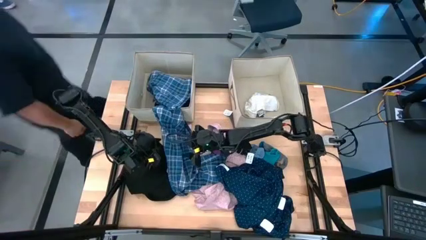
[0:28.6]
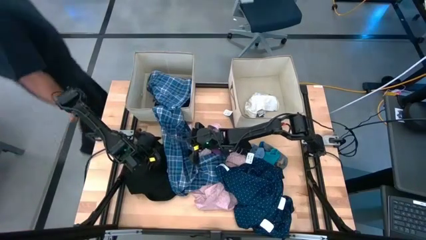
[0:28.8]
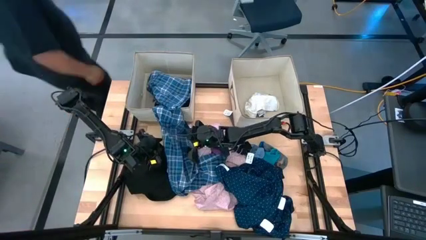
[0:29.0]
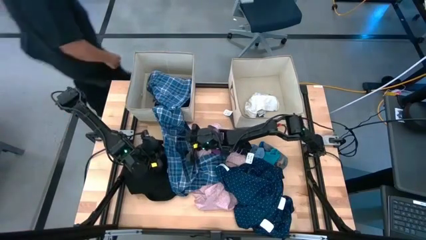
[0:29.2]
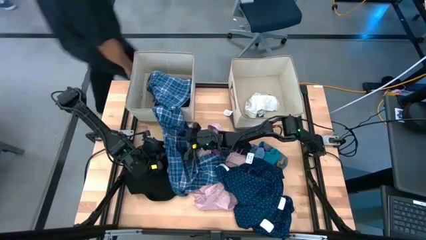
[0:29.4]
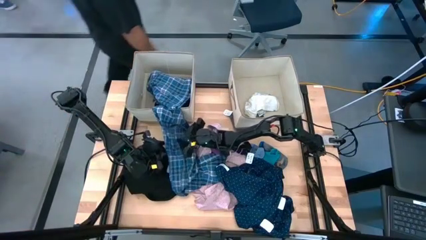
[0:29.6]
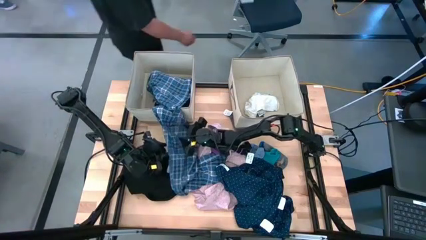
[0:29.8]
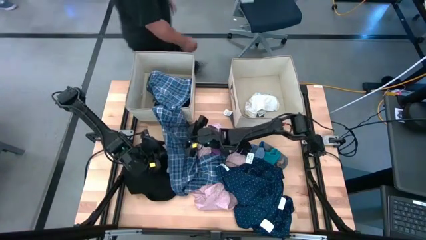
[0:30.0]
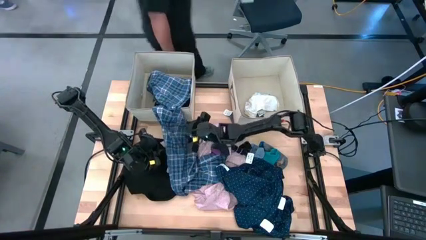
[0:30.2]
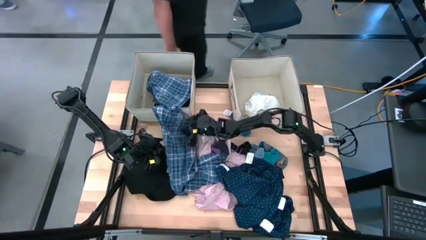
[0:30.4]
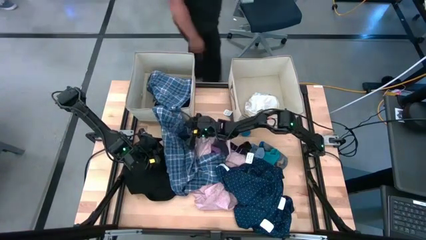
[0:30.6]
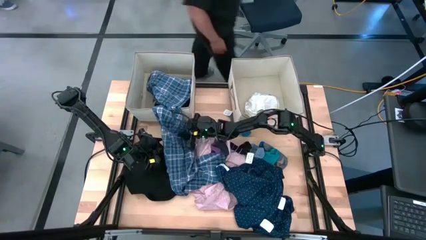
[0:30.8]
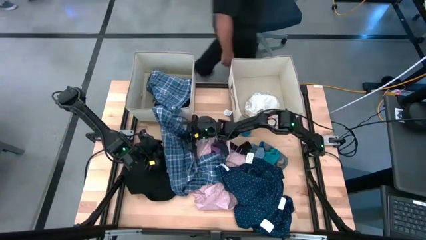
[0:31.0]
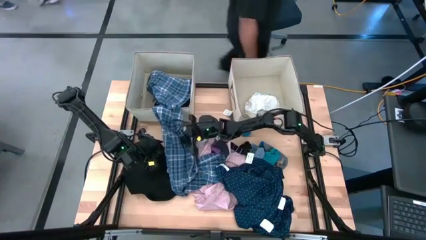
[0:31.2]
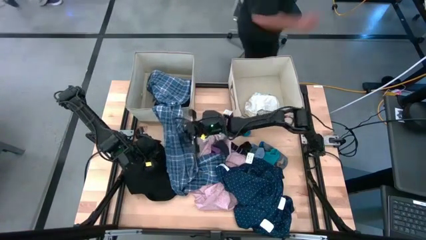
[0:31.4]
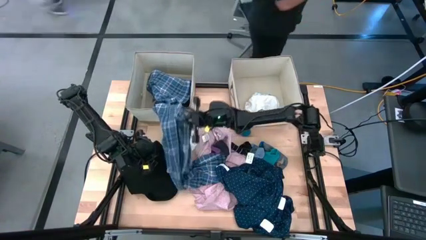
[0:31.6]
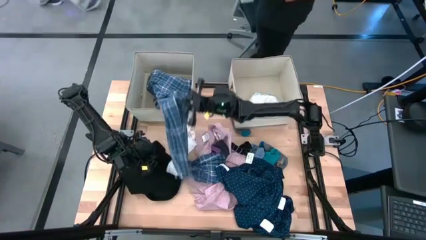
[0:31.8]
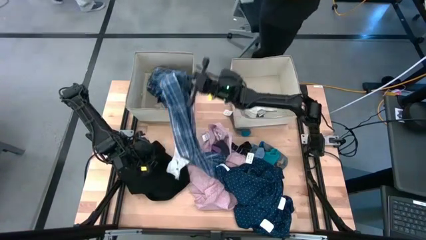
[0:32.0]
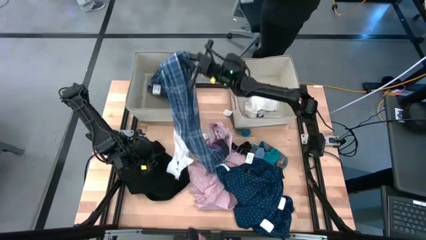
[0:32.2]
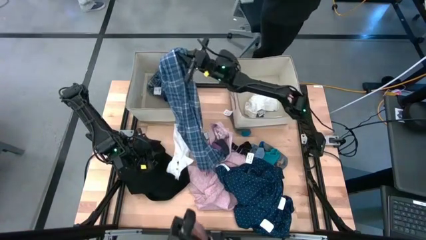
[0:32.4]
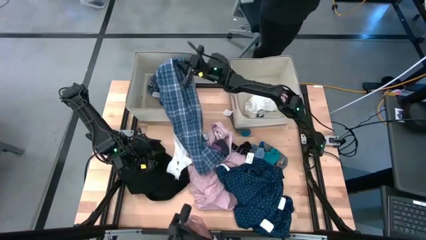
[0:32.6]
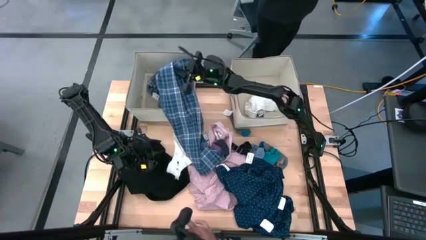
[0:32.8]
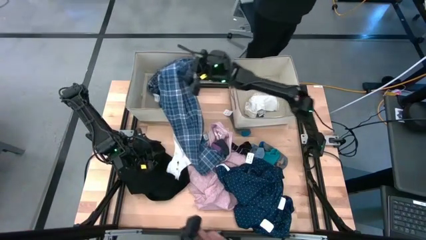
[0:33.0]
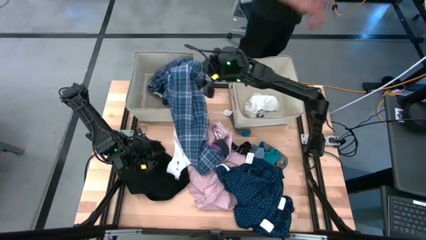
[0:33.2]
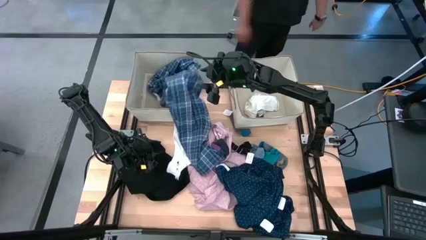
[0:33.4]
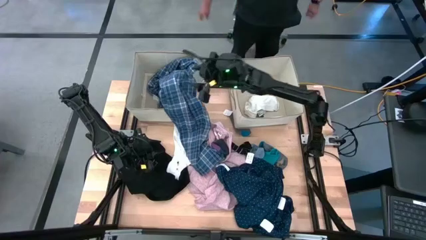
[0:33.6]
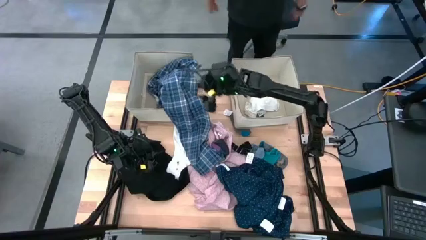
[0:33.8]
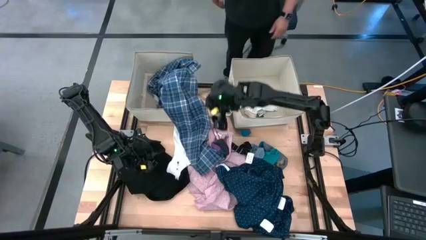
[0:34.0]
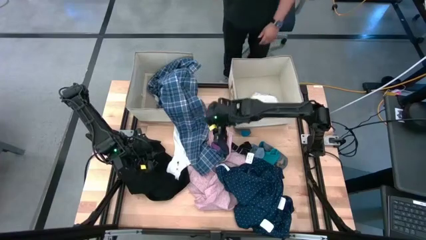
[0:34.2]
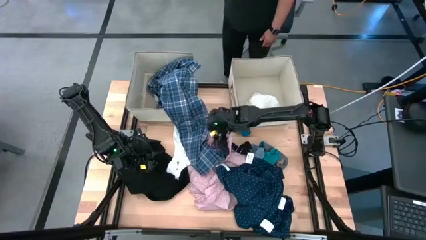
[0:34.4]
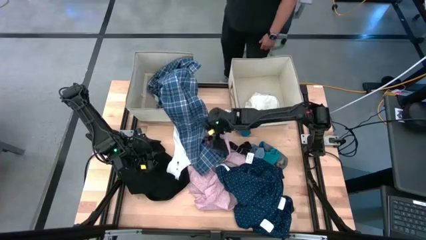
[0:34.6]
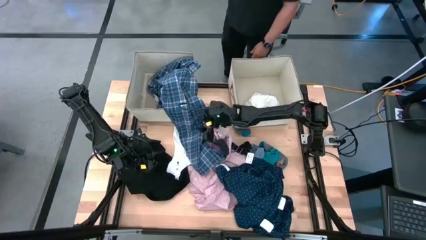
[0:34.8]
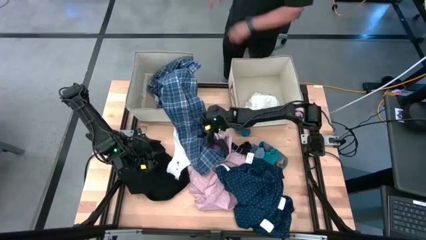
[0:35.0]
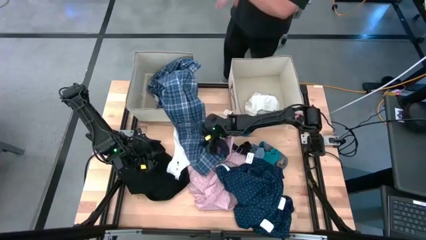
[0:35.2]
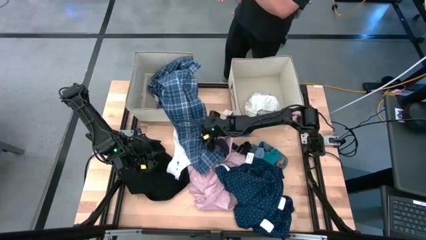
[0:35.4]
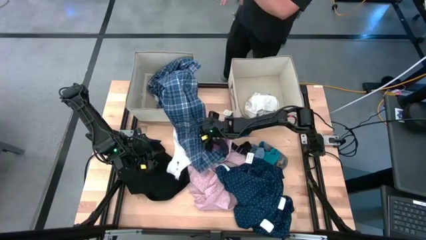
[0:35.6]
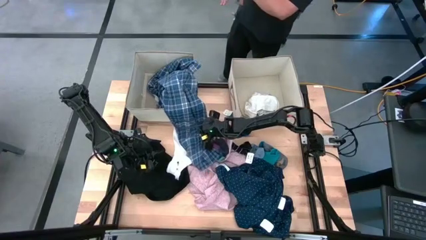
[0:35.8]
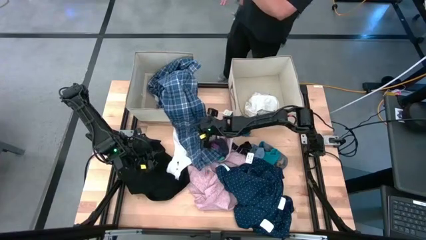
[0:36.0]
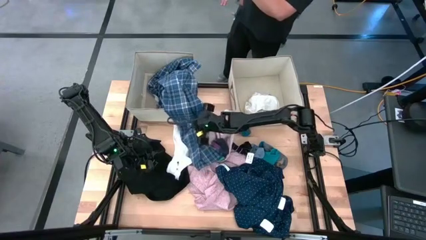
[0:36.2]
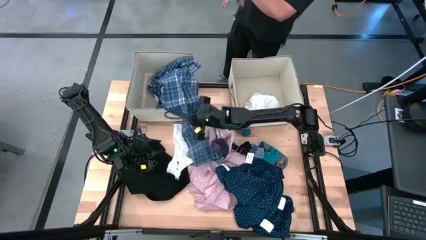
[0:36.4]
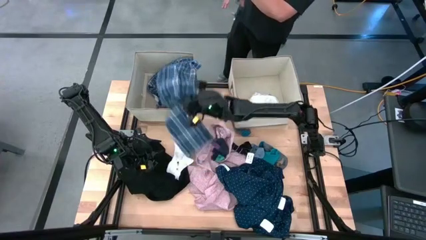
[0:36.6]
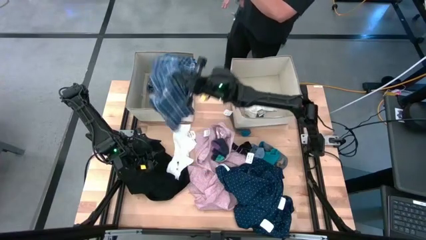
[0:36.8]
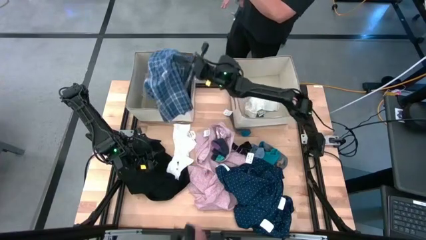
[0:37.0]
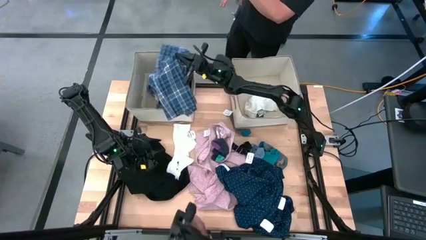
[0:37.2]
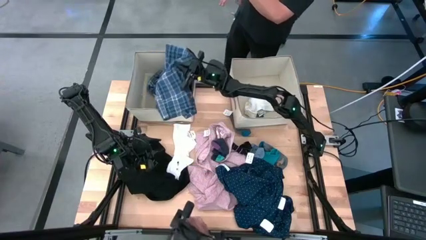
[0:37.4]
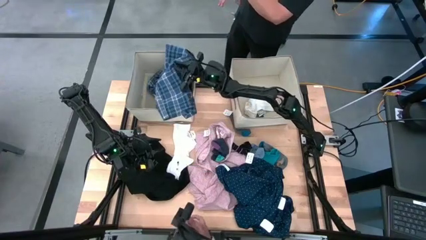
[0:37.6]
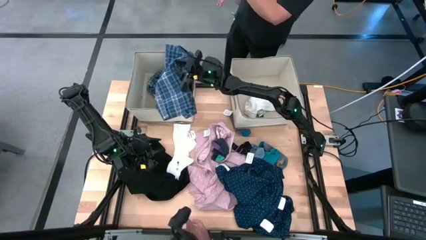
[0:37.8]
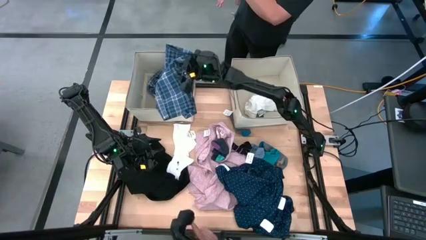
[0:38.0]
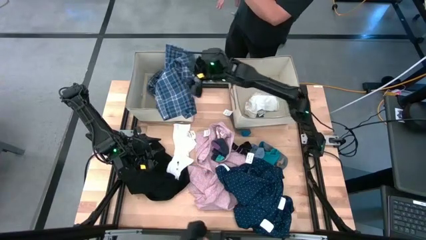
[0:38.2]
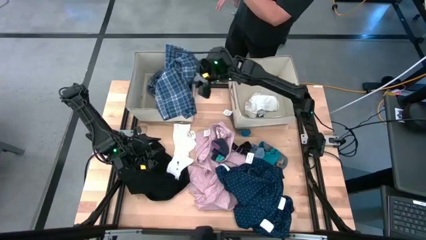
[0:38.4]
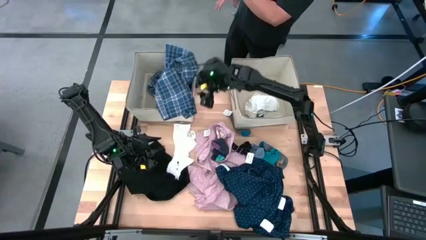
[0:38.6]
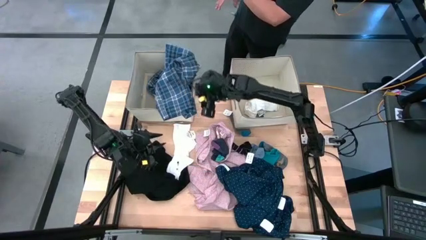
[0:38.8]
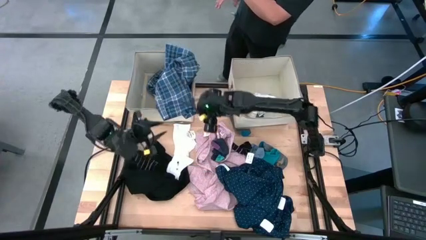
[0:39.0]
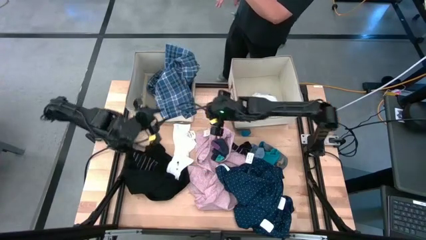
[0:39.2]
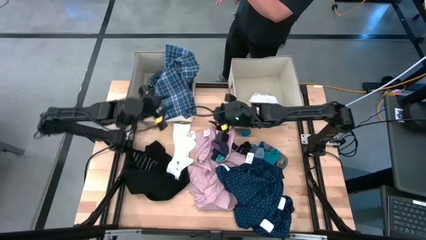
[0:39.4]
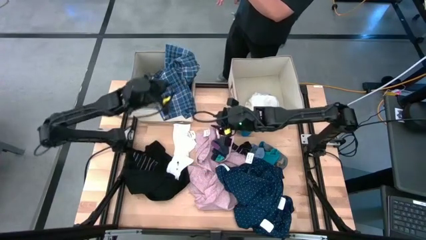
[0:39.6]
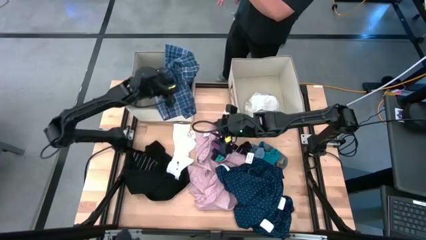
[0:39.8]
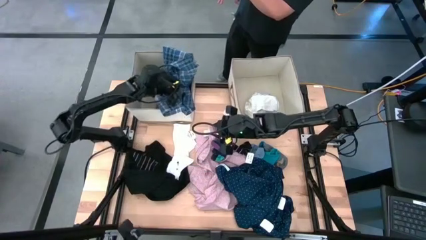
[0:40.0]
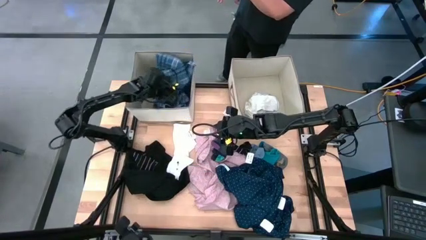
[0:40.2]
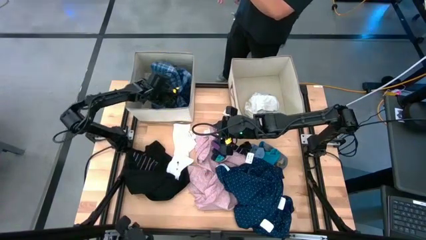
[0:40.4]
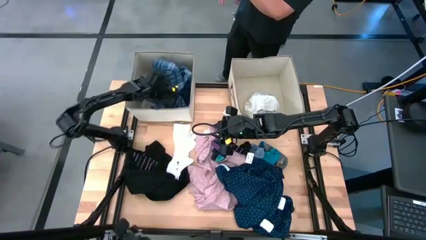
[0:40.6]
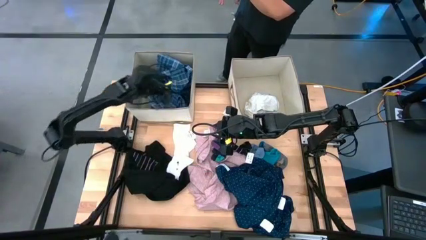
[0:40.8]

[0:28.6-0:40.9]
Task: Sort clothes
Put the blue checkered polo shirt into the left brown laundry organizer

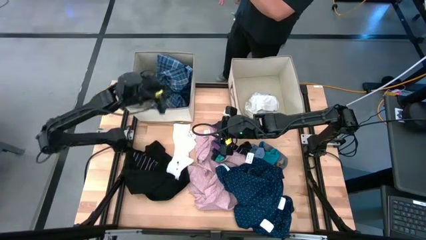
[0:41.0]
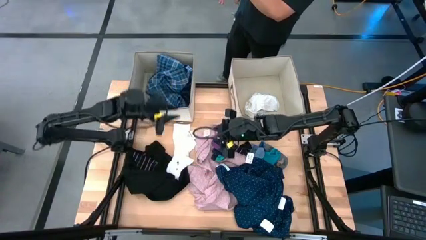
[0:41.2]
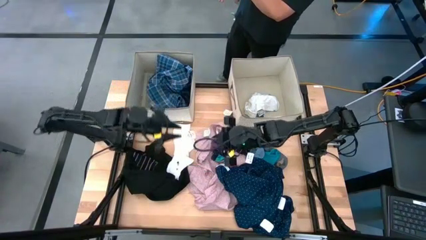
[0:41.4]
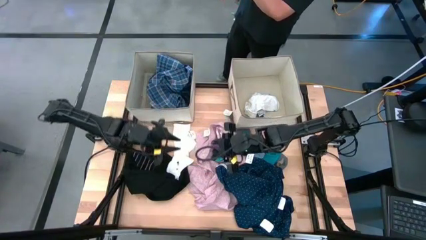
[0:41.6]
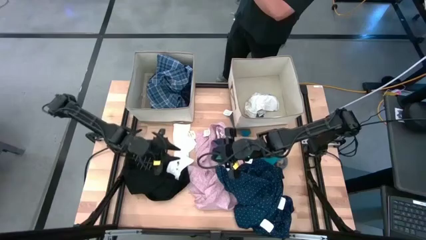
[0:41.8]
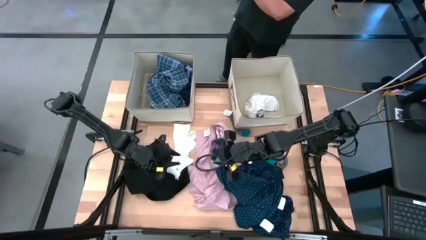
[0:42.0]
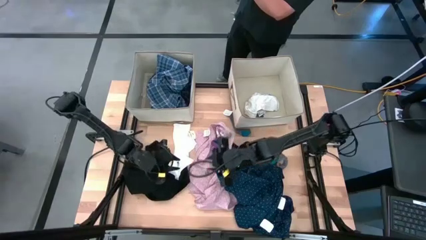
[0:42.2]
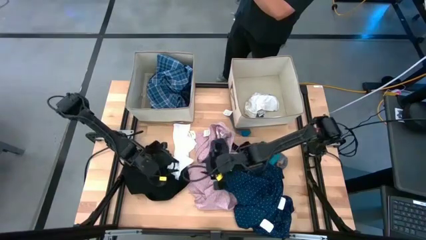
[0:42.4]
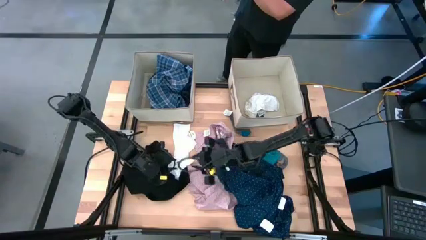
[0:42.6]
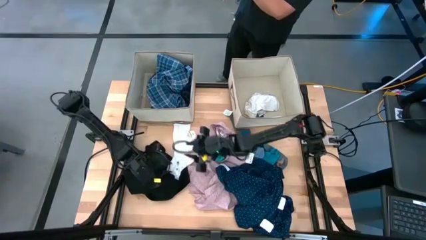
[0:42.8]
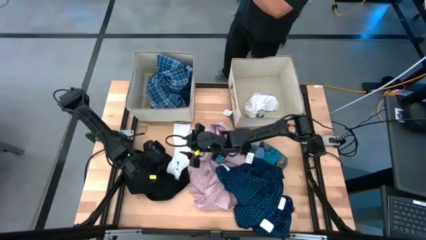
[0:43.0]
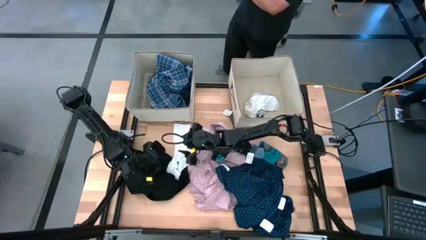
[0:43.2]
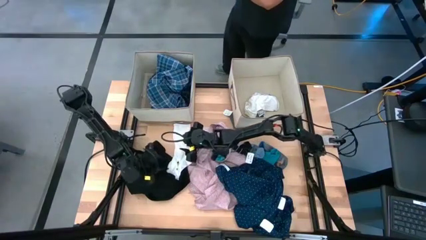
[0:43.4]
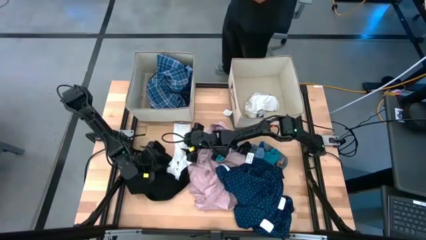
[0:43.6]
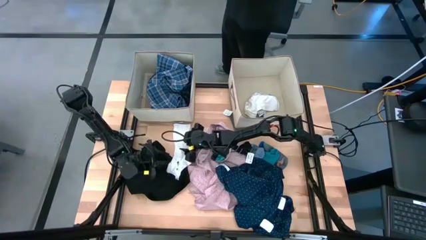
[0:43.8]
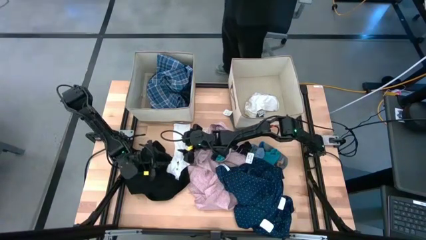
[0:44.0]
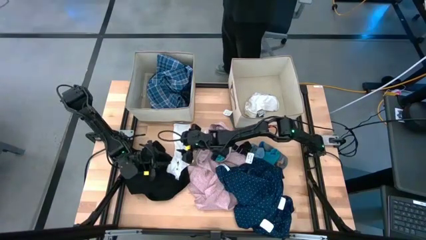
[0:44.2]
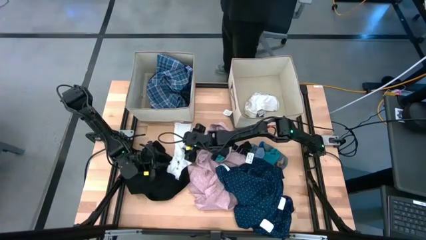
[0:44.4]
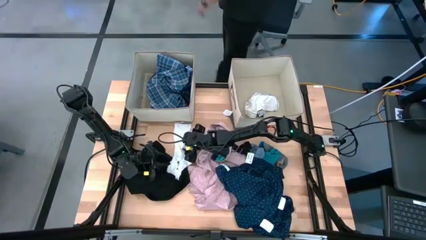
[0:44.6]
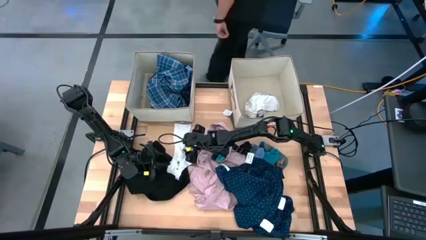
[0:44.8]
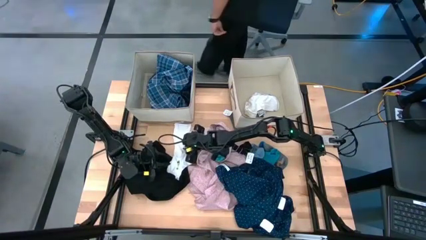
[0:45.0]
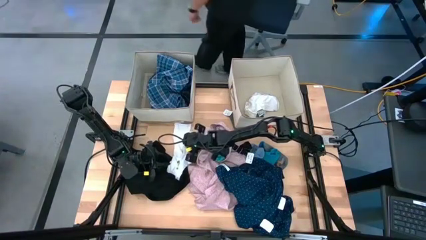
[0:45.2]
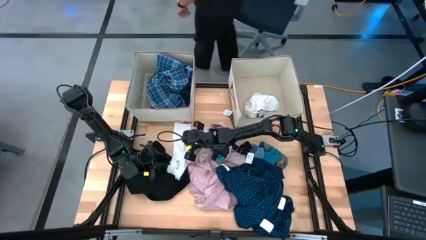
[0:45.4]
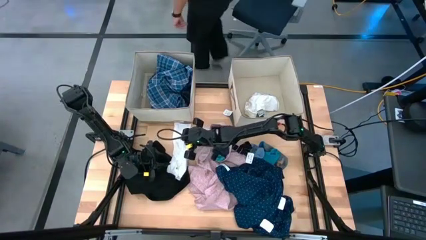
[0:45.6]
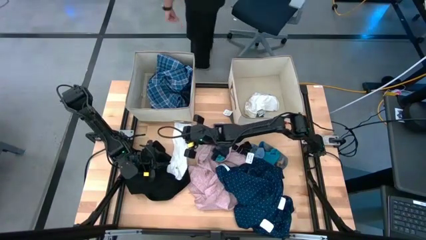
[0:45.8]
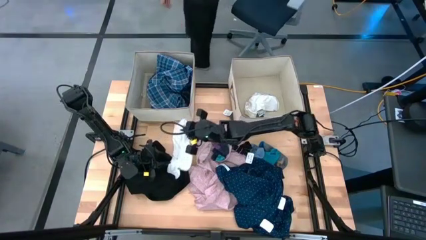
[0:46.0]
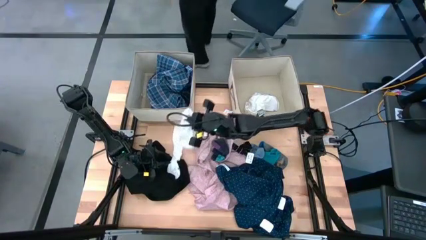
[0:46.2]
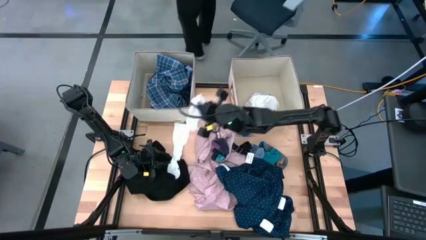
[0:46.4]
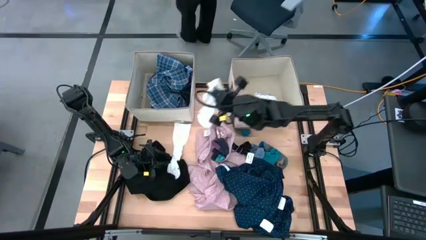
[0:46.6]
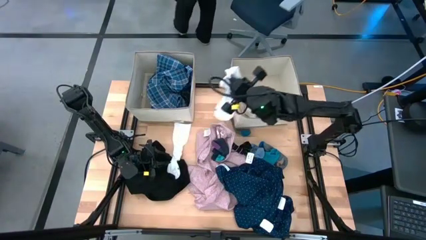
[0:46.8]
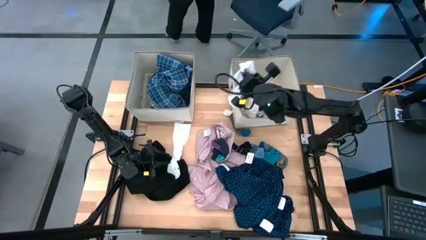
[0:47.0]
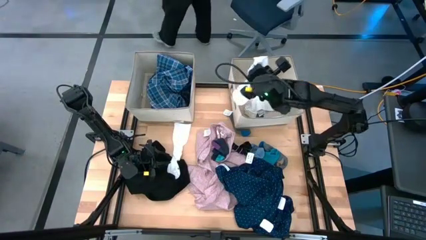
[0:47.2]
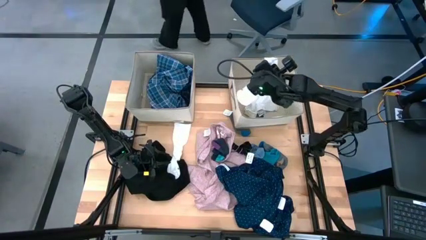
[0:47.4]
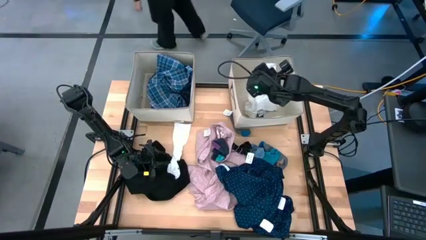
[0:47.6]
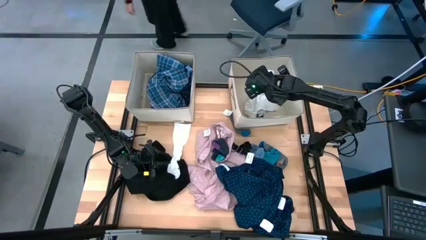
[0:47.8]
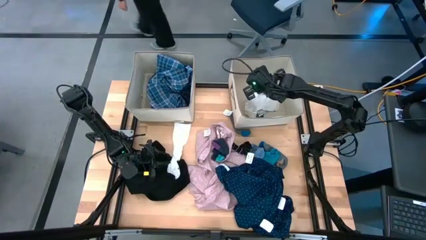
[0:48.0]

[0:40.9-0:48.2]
Put the white sock into the right brown laundry organizer
